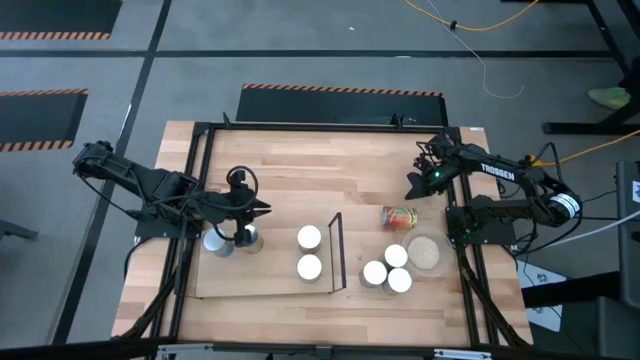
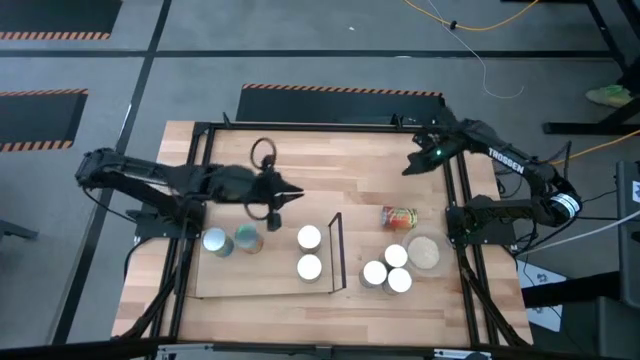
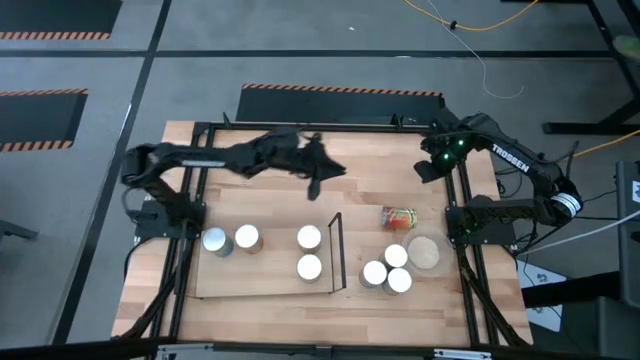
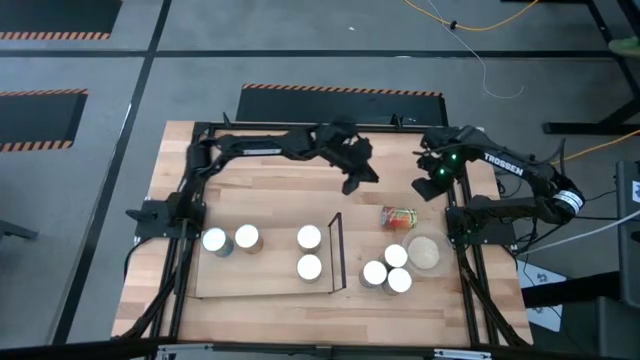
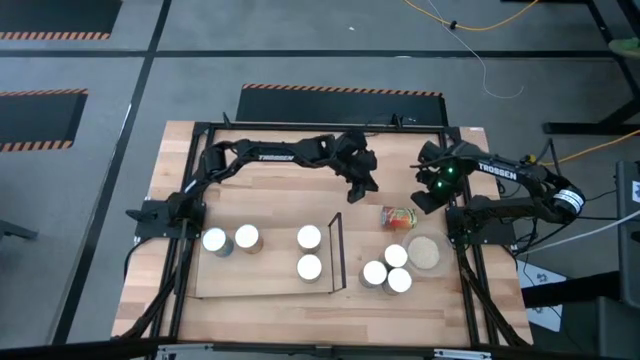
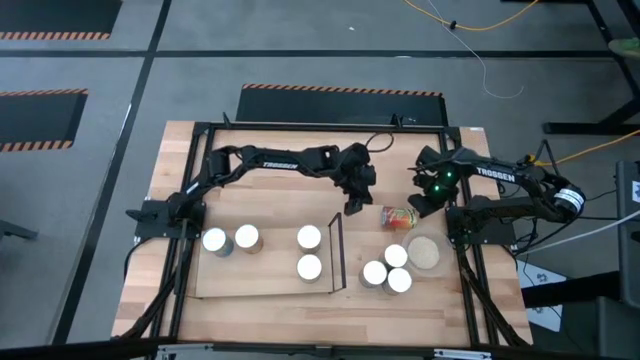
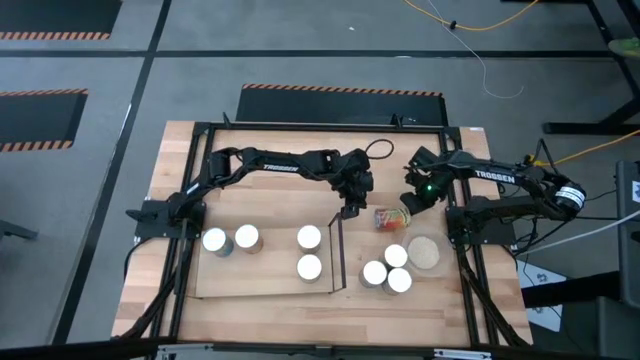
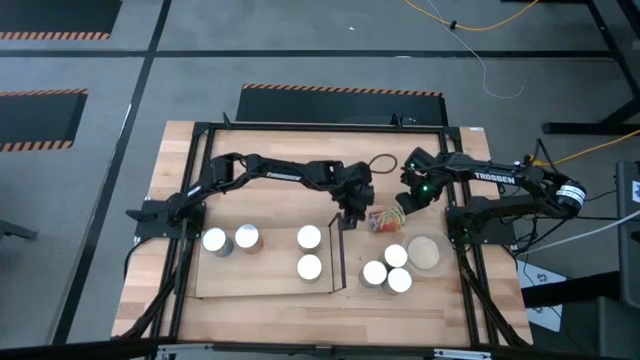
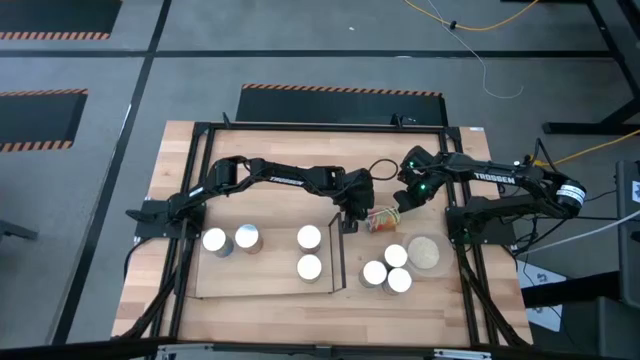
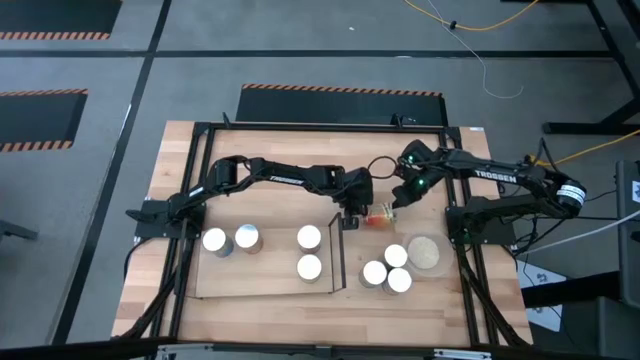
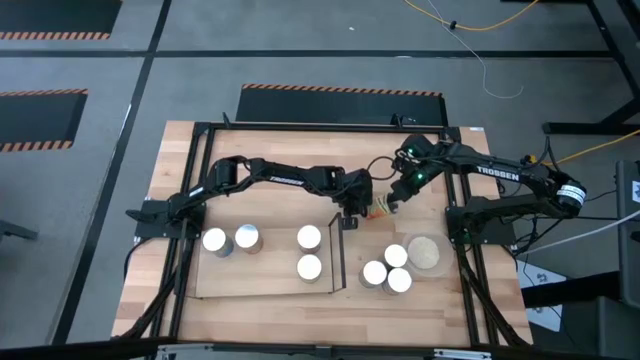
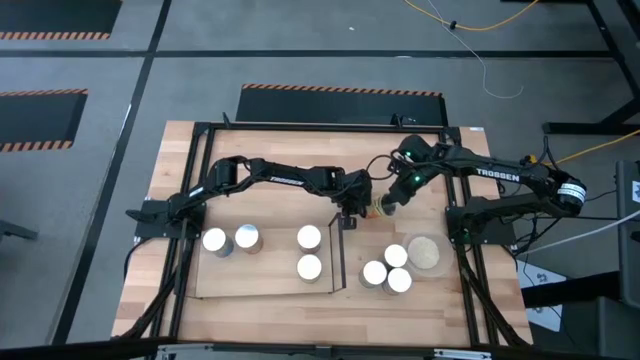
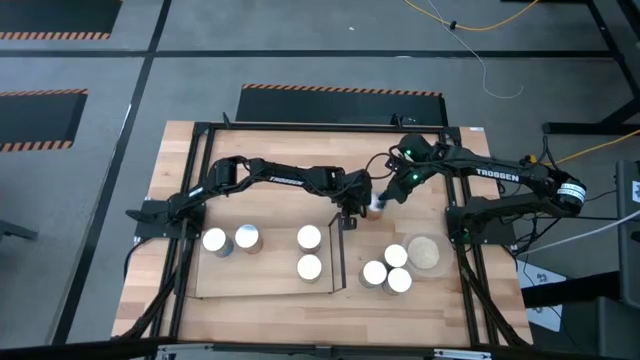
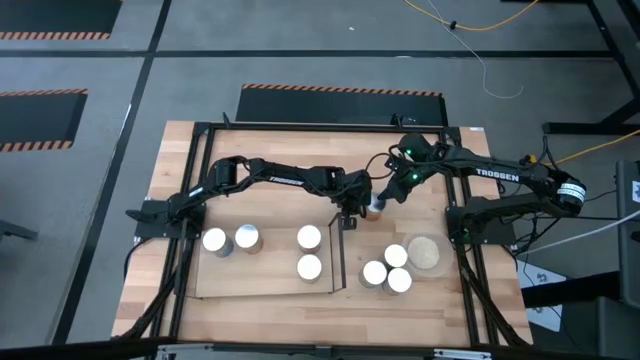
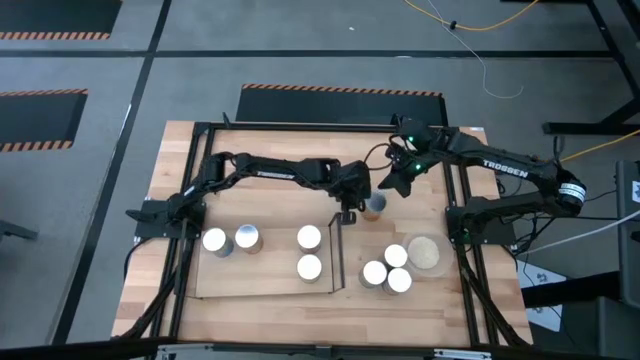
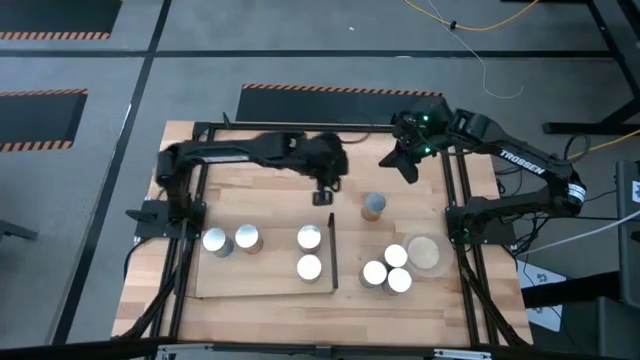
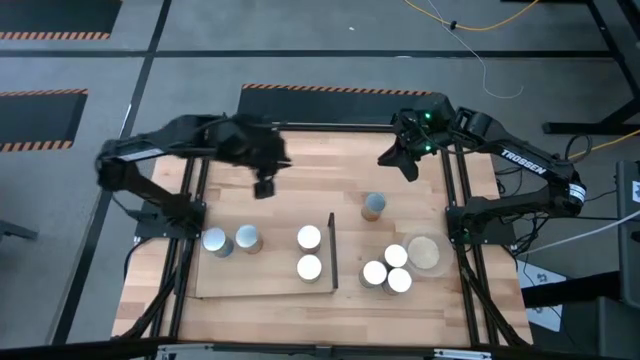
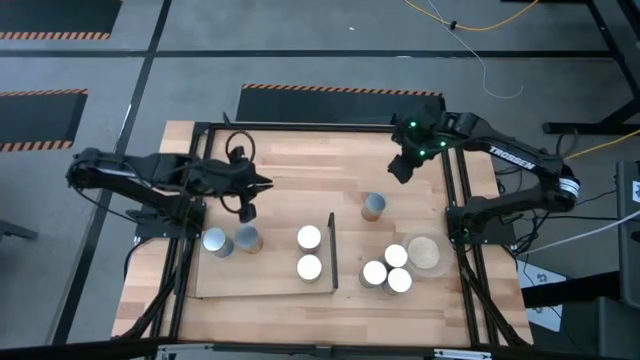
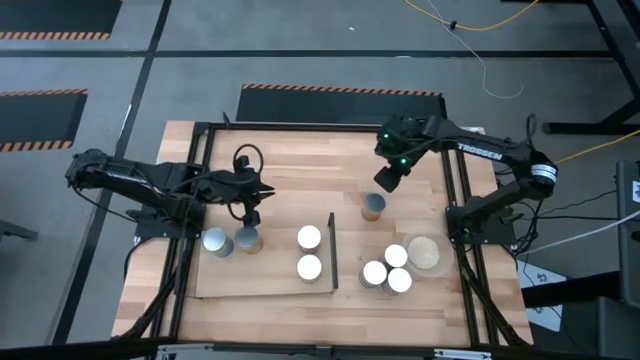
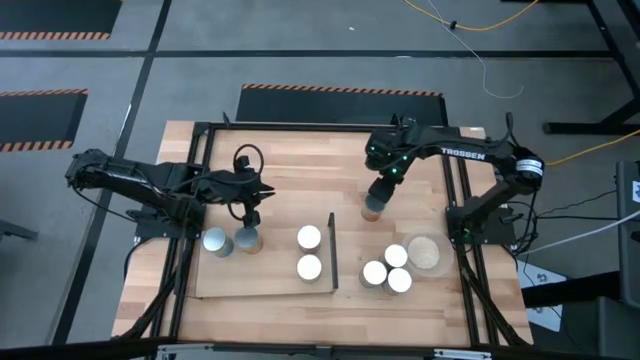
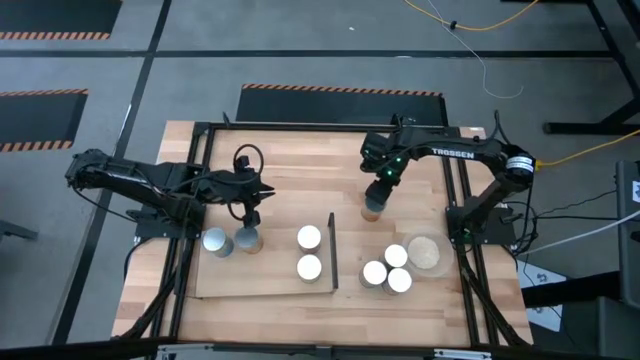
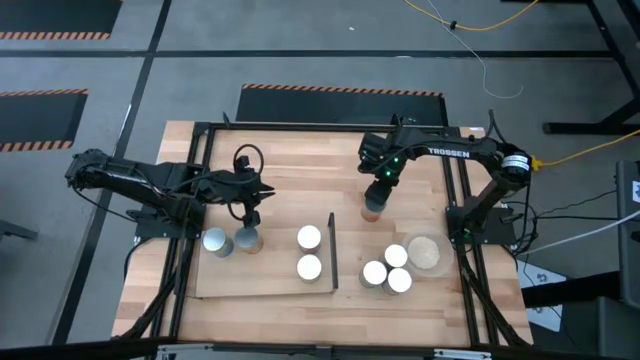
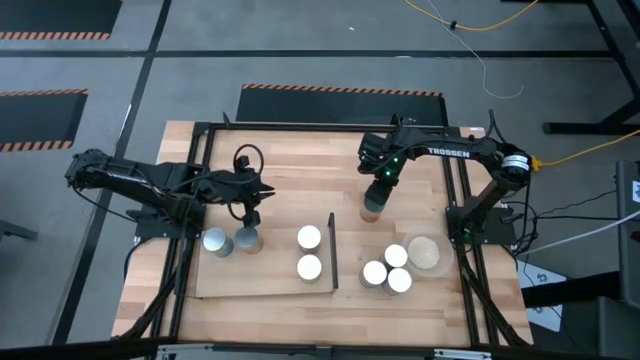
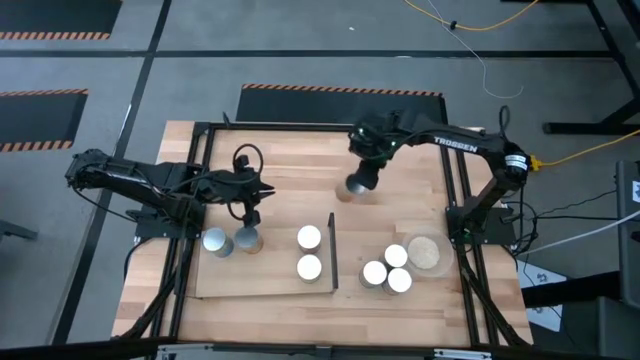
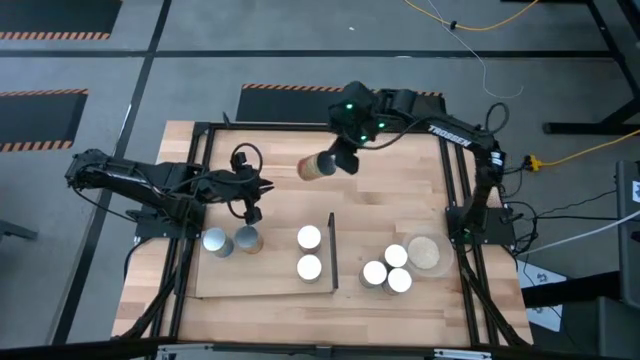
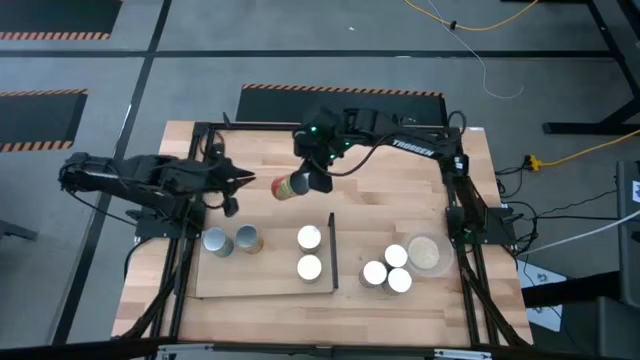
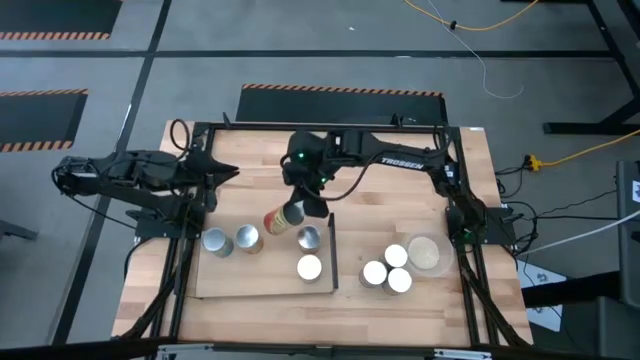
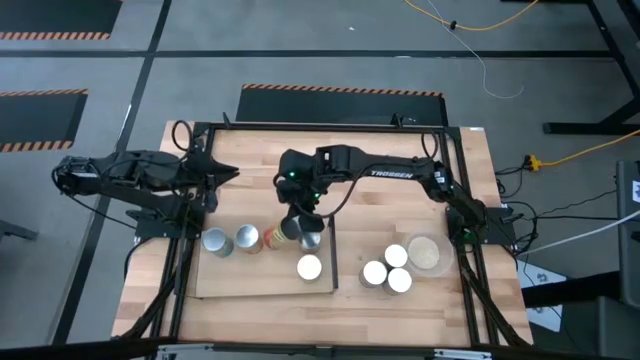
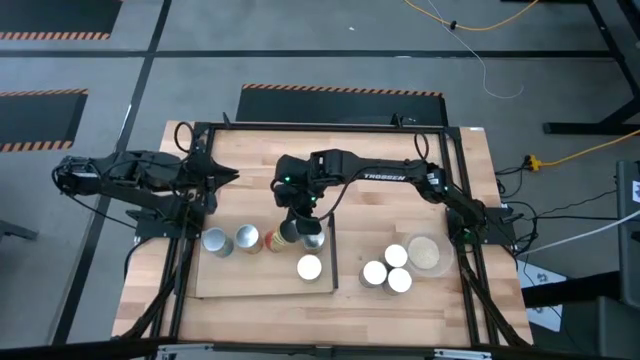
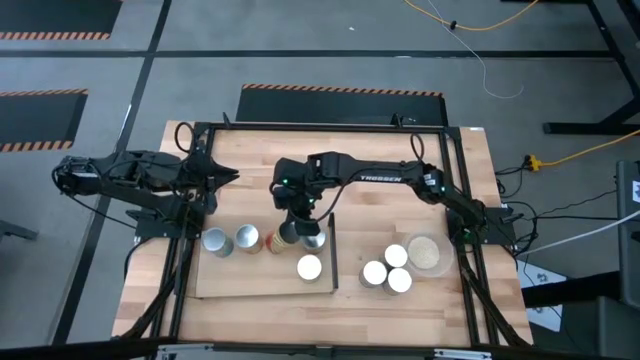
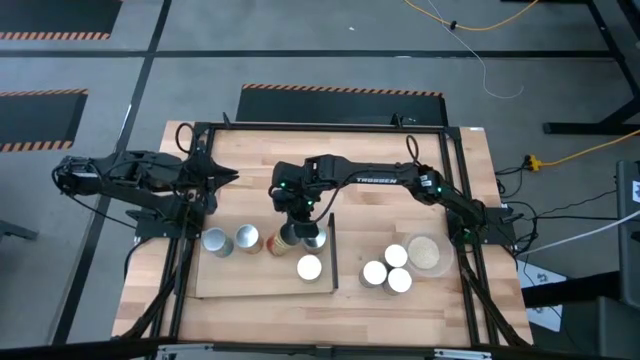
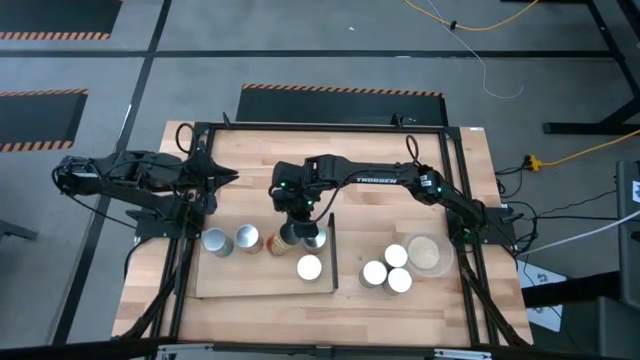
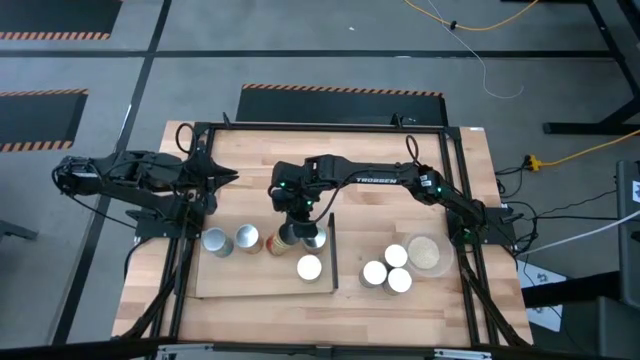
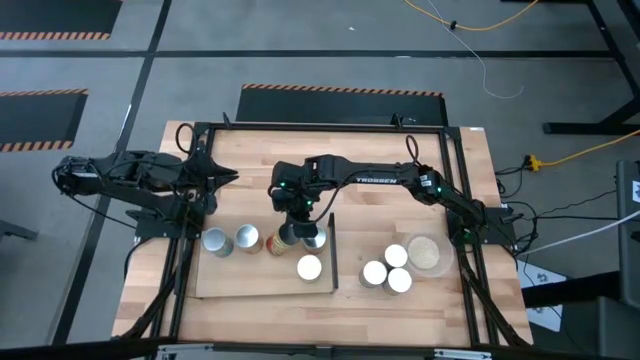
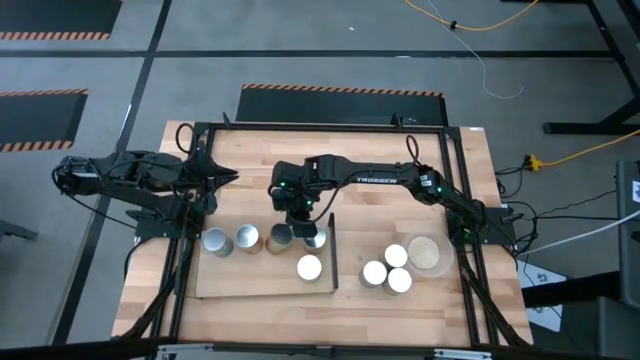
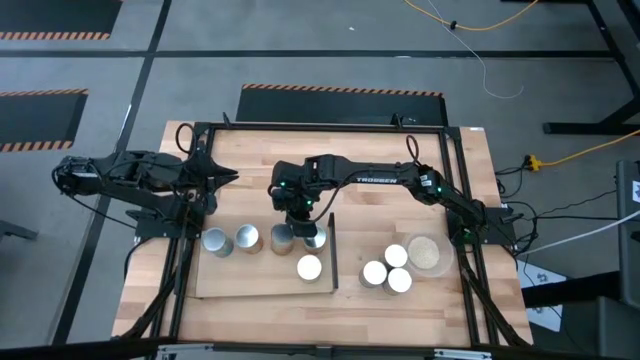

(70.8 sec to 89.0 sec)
Task: Pick and place cans onto a shelf
Put the green bean can on the shelf

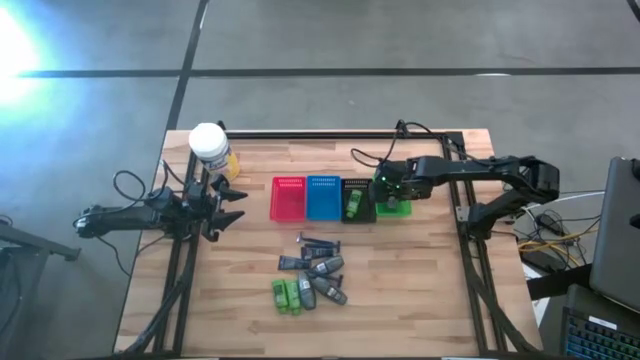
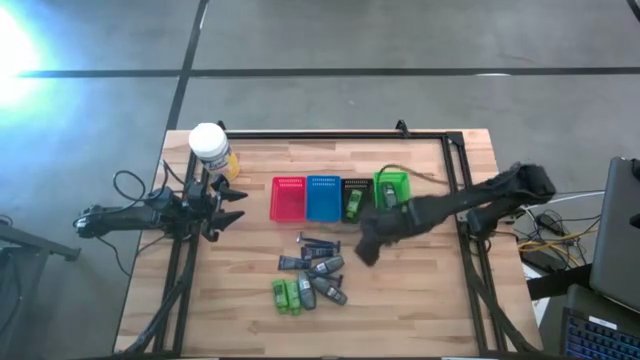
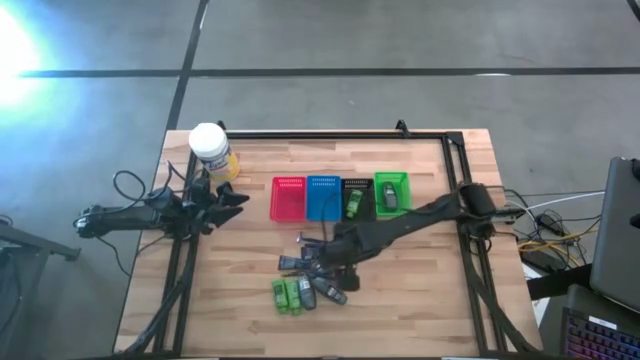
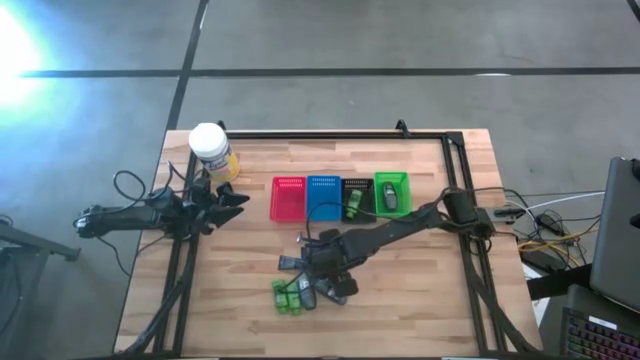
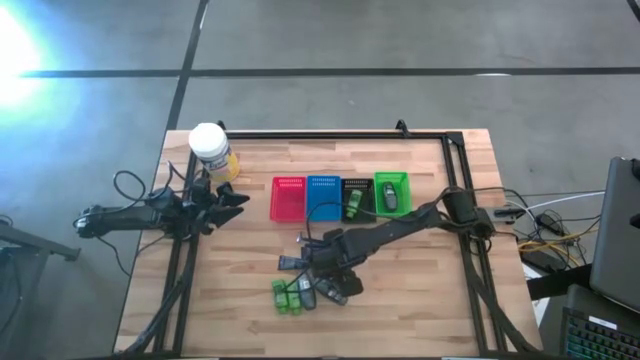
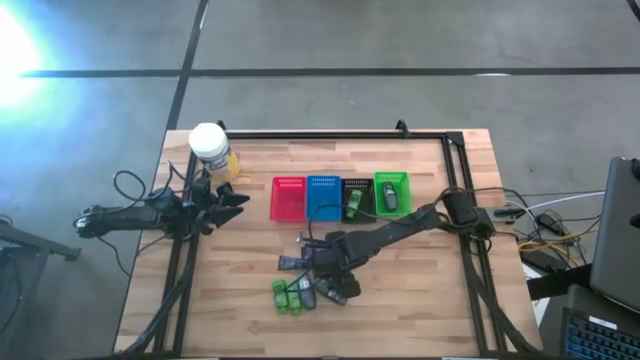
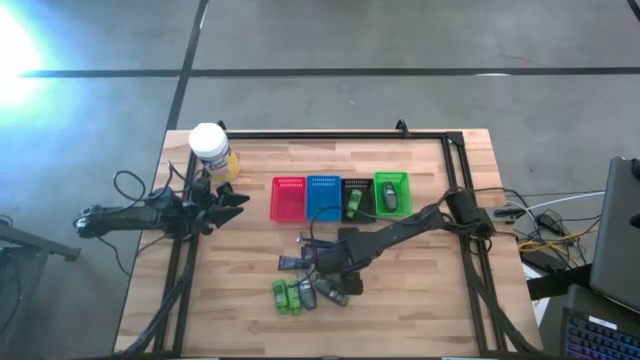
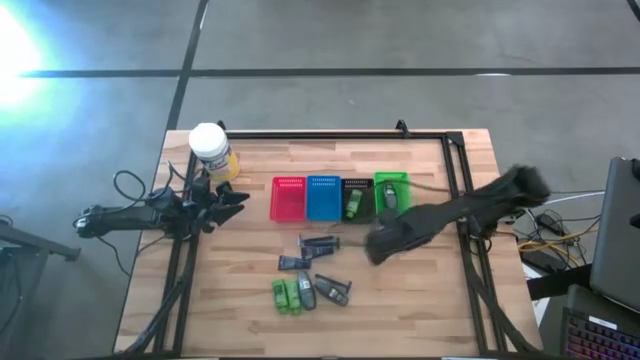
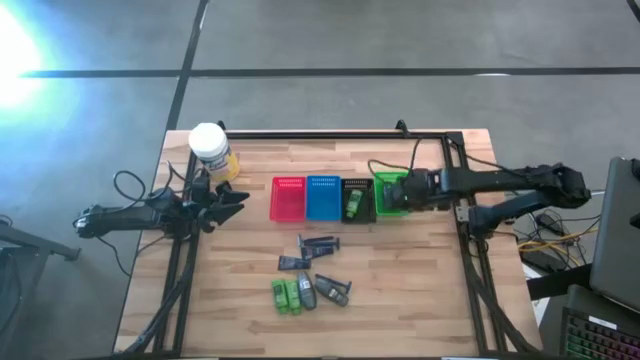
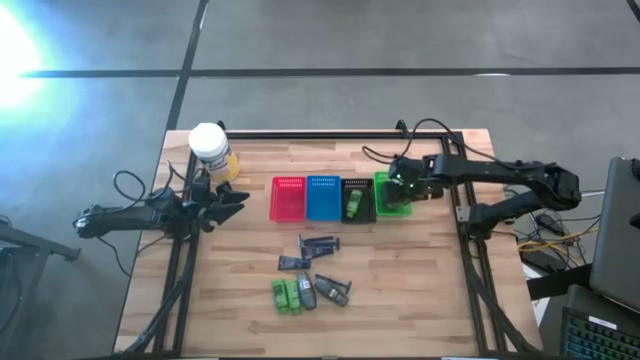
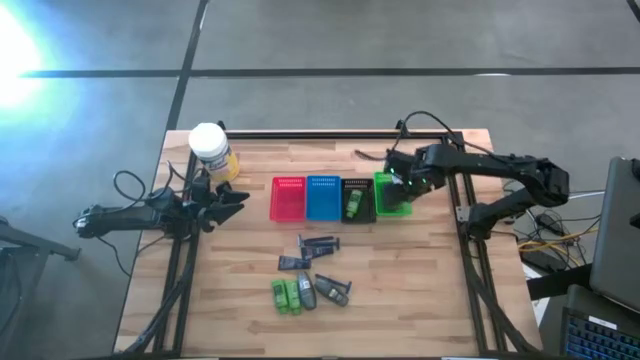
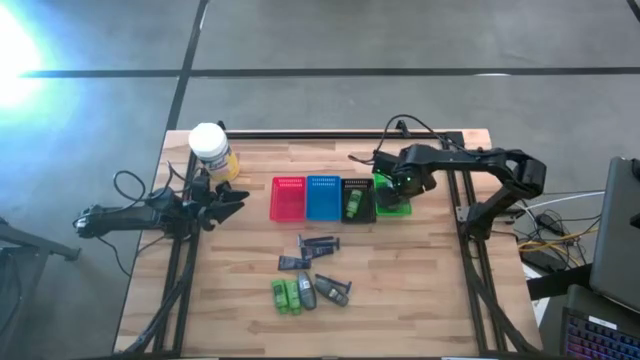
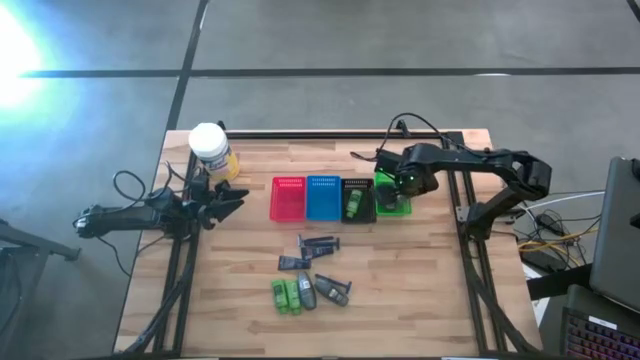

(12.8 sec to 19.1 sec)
Task: Pick & Place Travel size toiletries
Put the deodorant into the green basket
